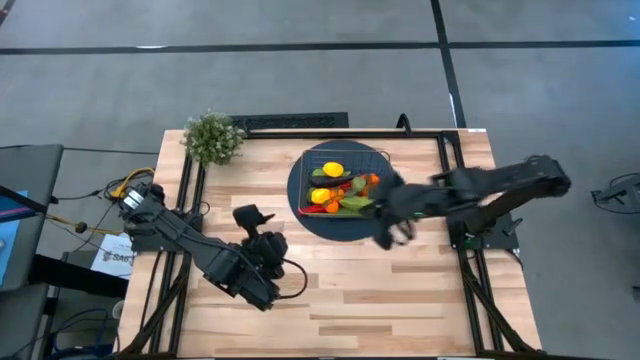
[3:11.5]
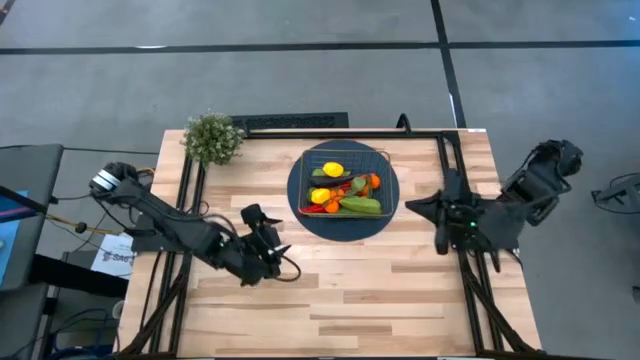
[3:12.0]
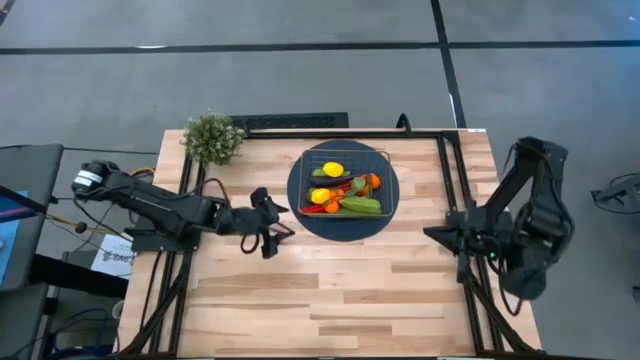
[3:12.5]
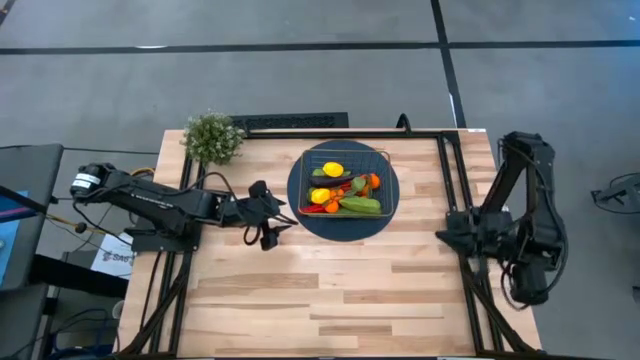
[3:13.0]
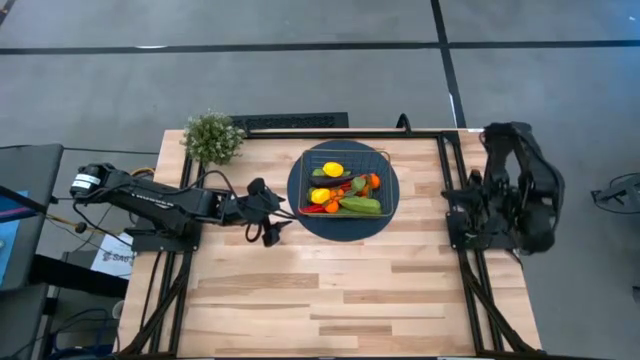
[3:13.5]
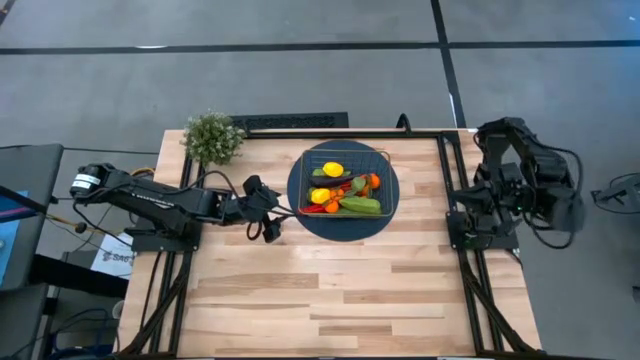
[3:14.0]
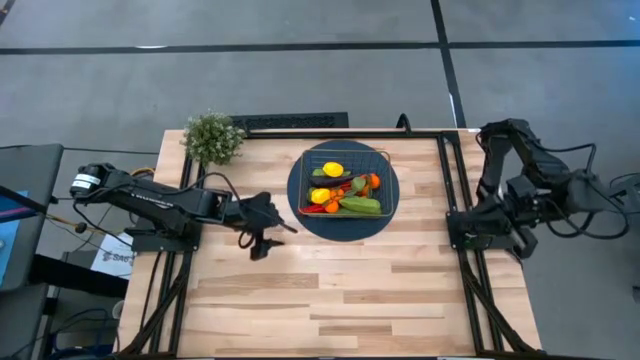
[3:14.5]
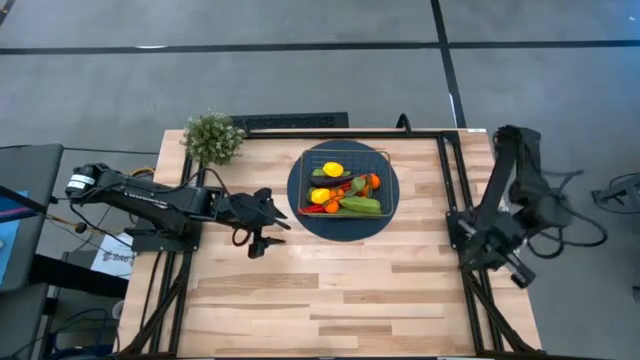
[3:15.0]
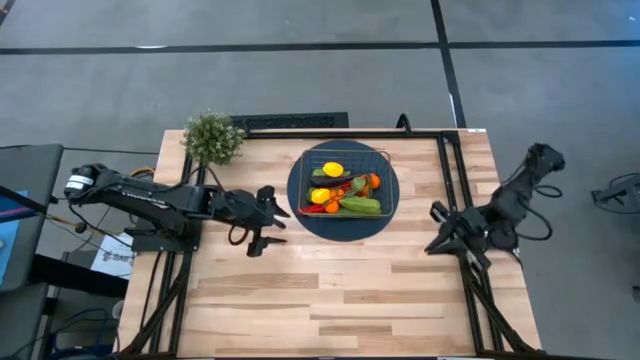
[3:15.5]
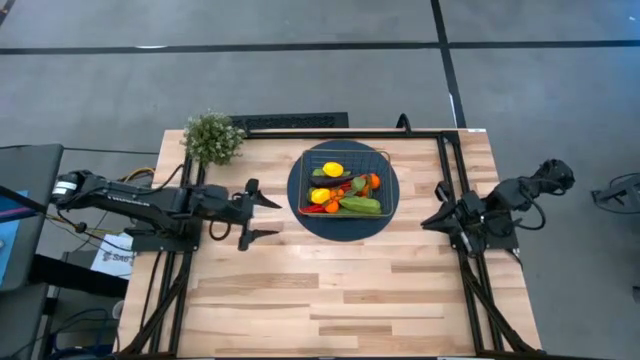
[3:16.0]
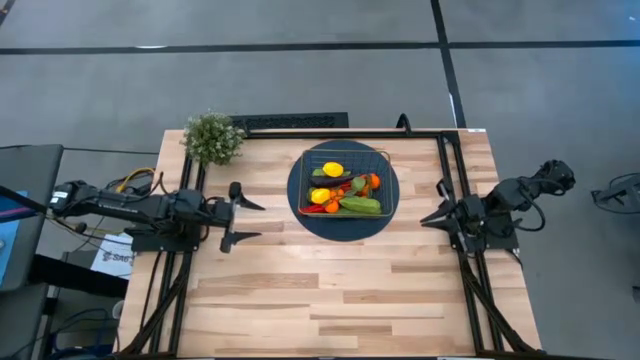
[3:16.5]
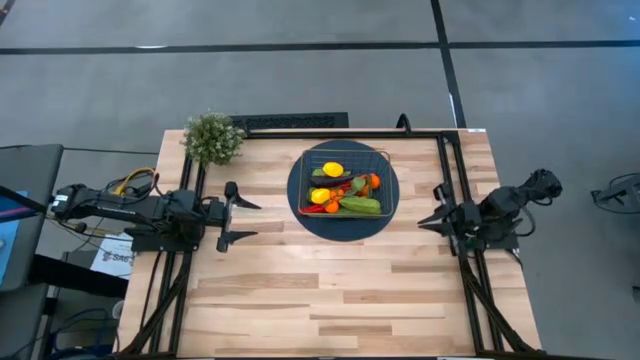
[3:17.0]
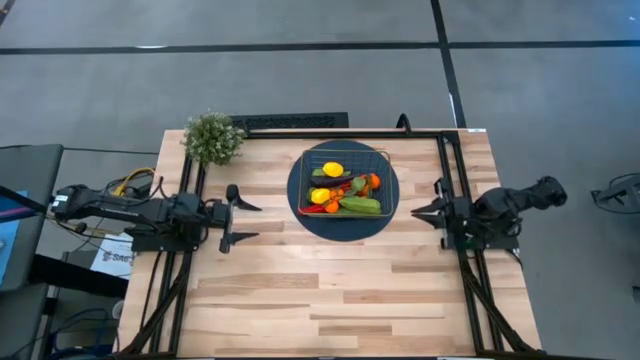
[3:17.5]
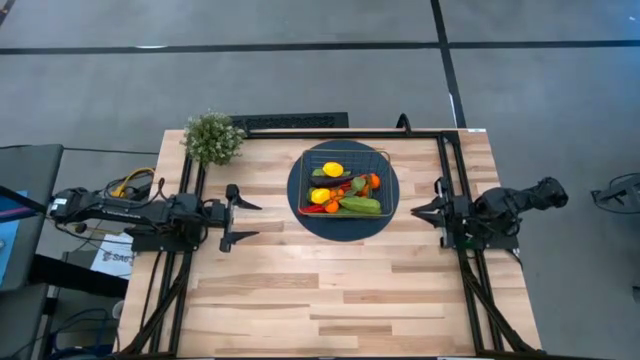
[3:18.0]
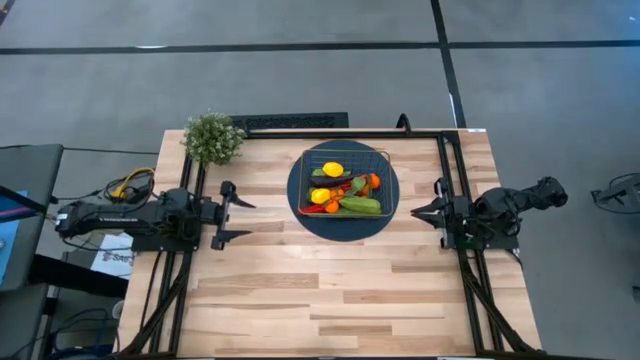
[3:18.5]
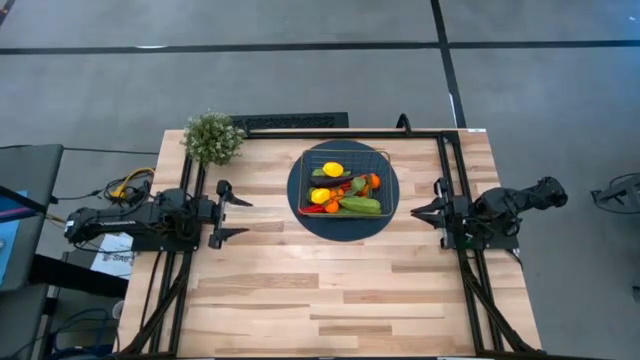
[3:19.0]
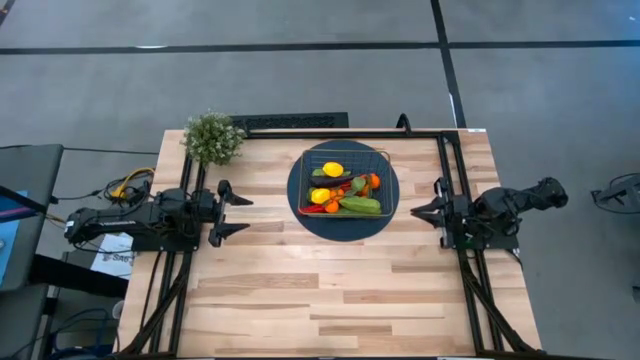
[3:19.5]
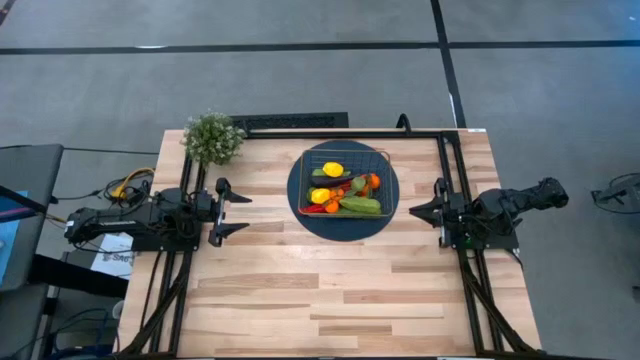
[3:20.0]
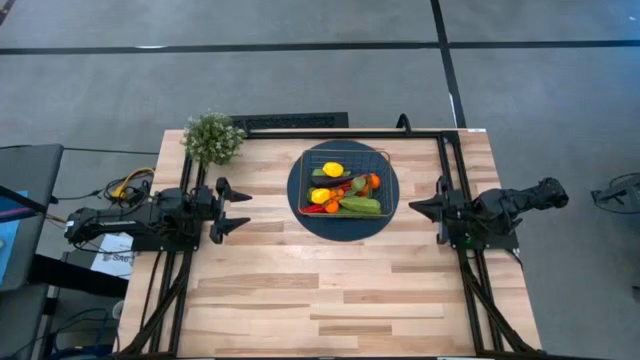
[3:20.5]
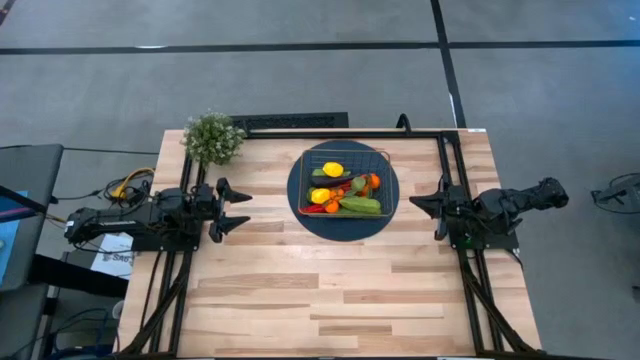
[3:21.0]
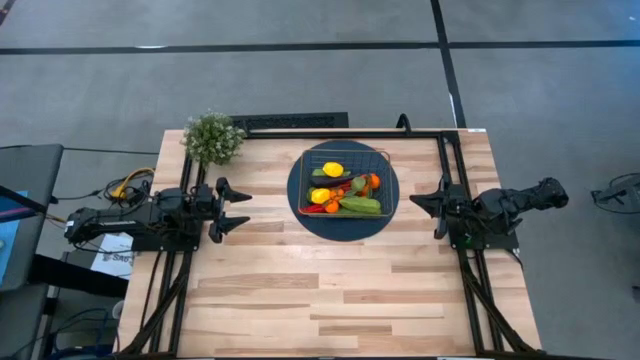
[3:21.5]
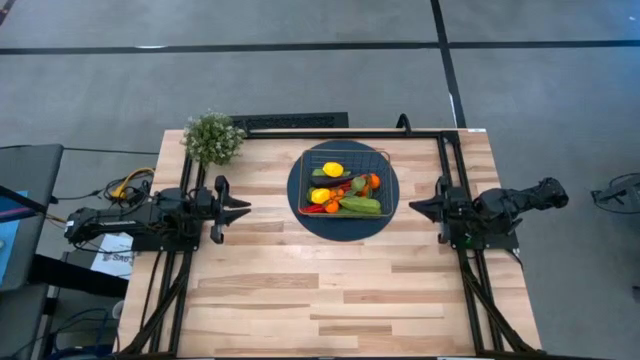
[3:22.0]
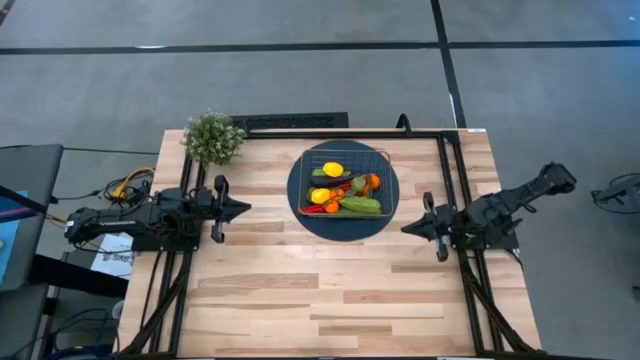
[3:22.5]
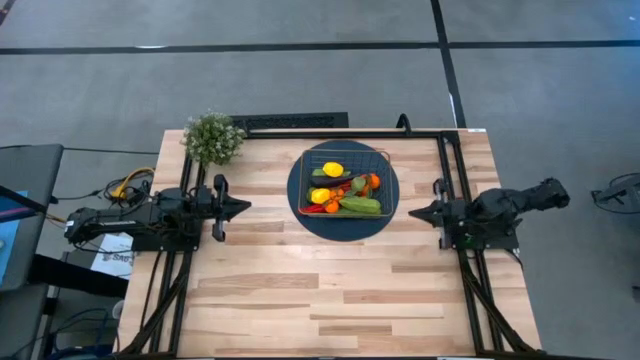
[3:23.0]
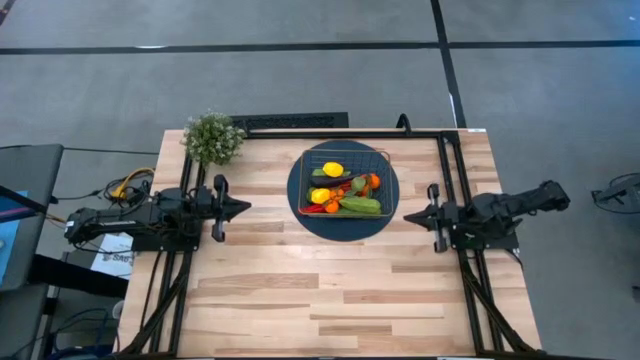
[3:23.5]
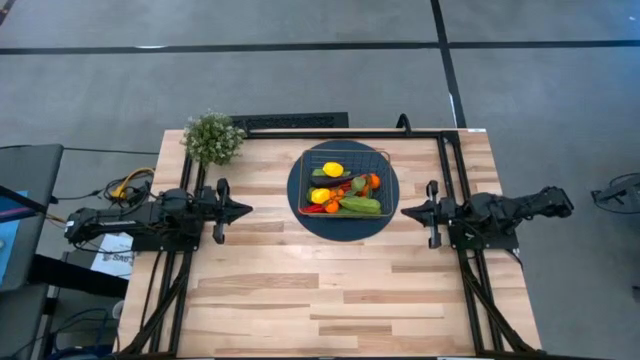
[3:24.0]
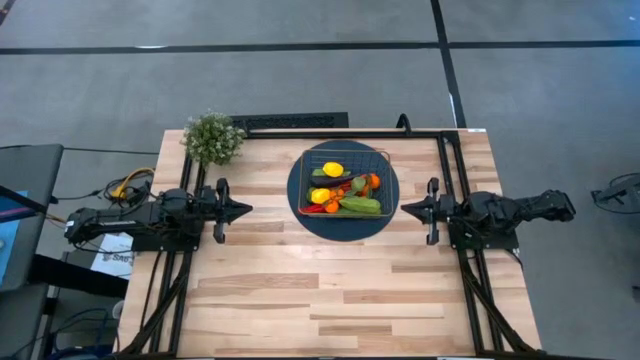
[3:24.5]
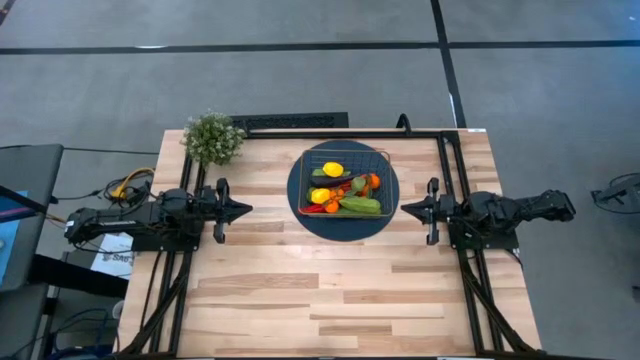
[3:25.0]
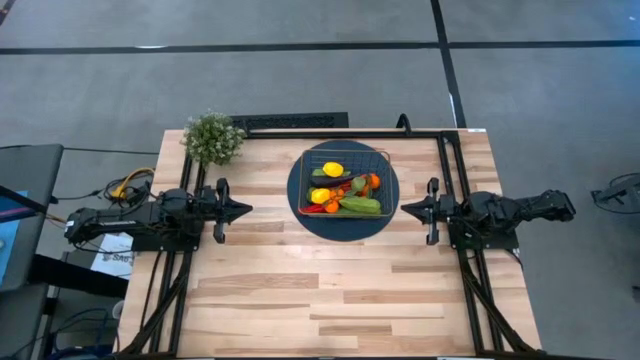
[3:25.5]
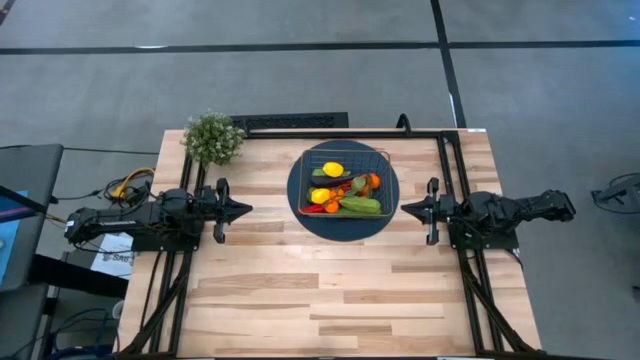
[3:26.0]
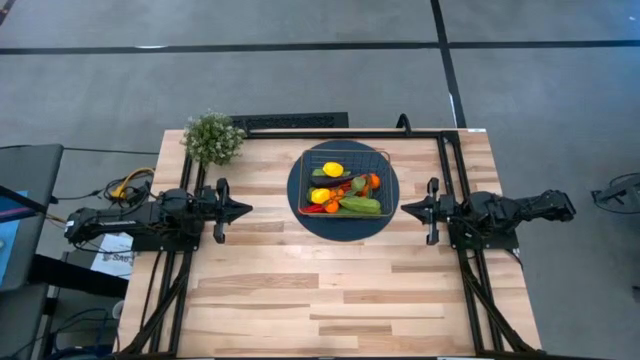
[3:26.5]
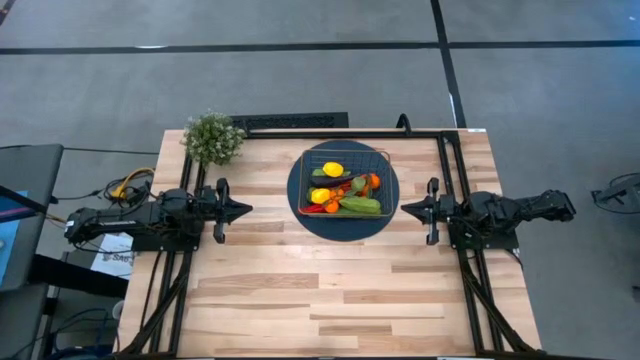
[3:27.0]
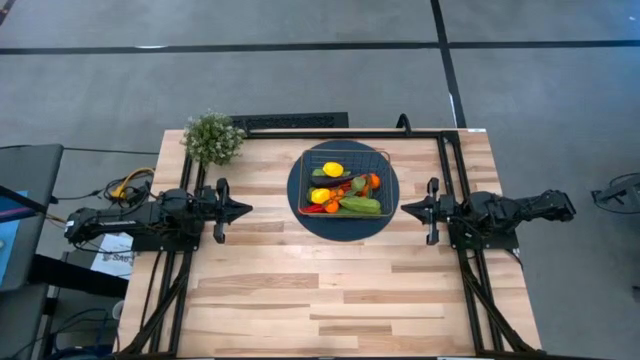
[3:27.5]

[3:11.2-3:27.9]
Task: Build produce basket
Return to Home Position

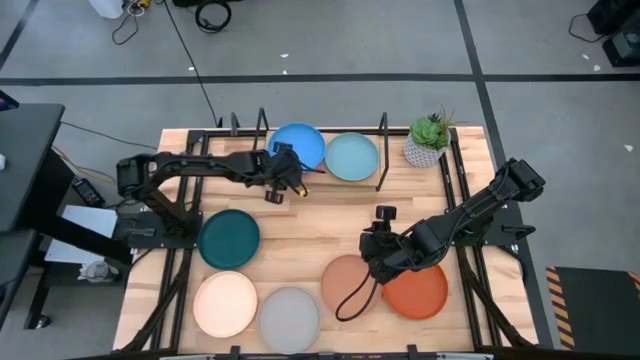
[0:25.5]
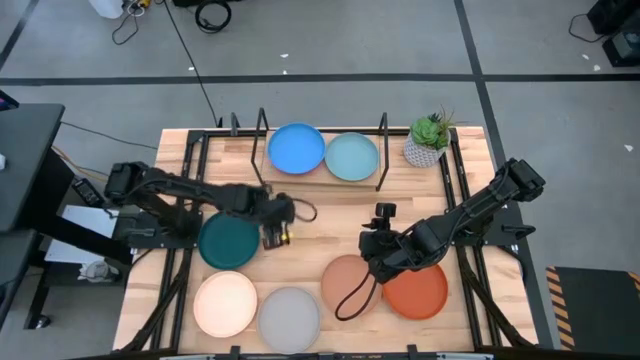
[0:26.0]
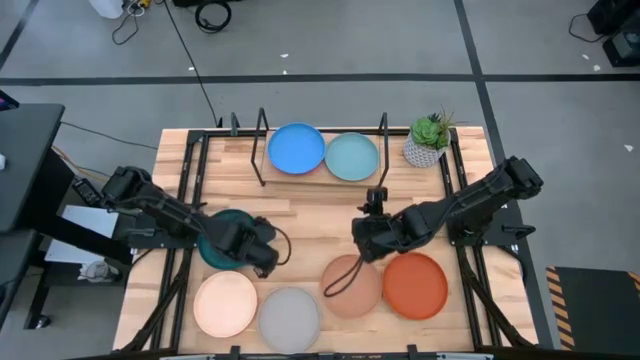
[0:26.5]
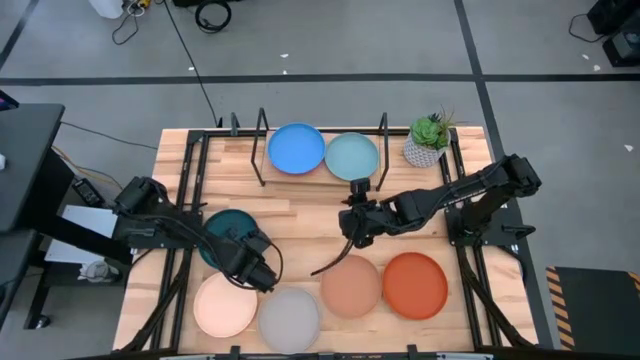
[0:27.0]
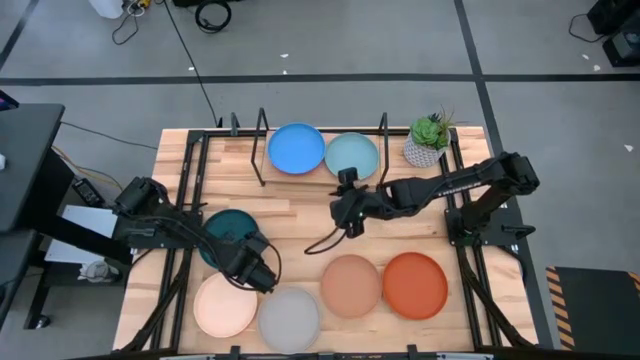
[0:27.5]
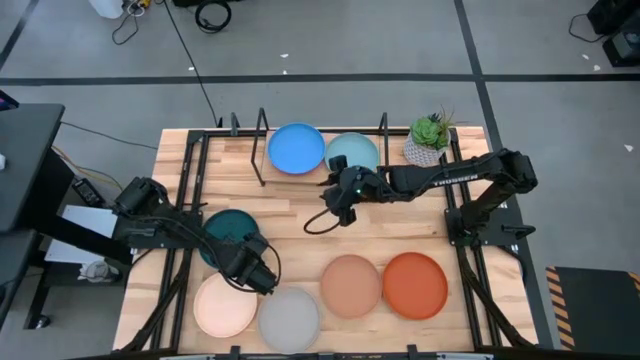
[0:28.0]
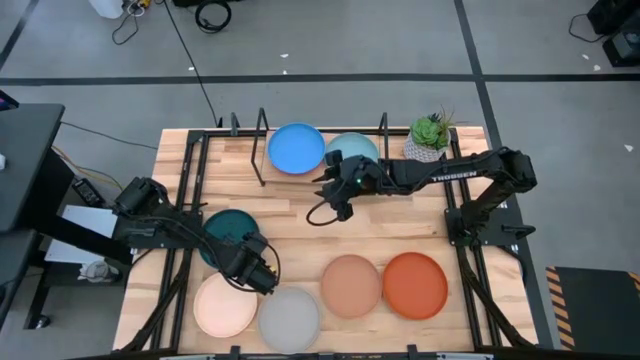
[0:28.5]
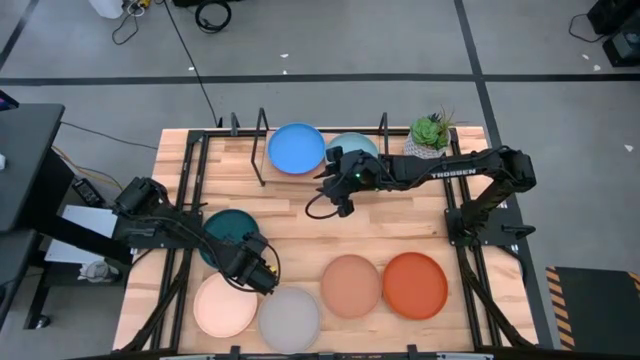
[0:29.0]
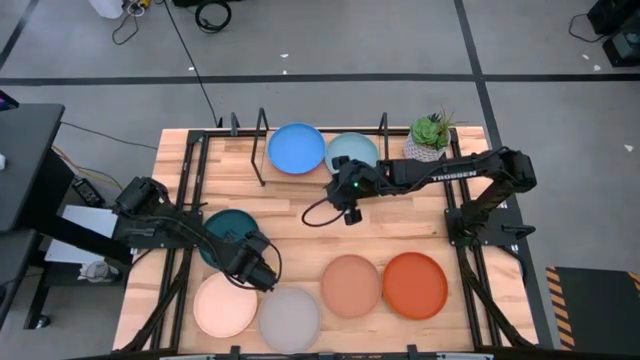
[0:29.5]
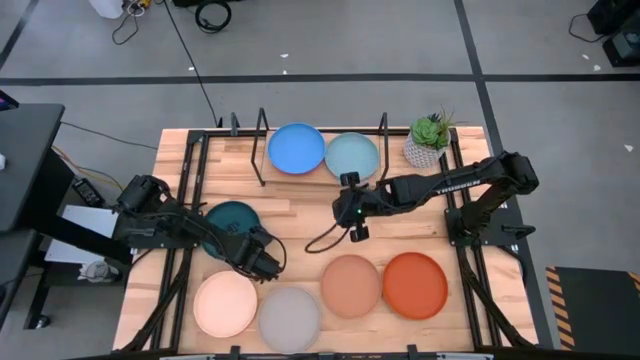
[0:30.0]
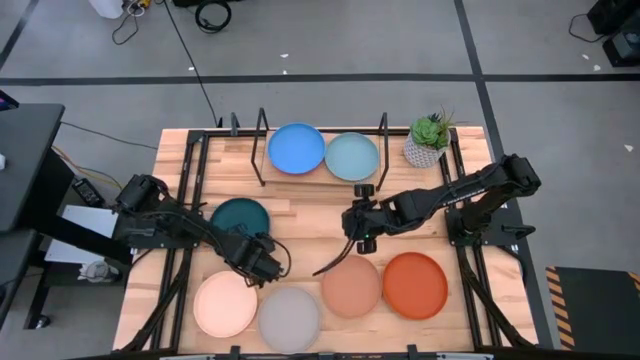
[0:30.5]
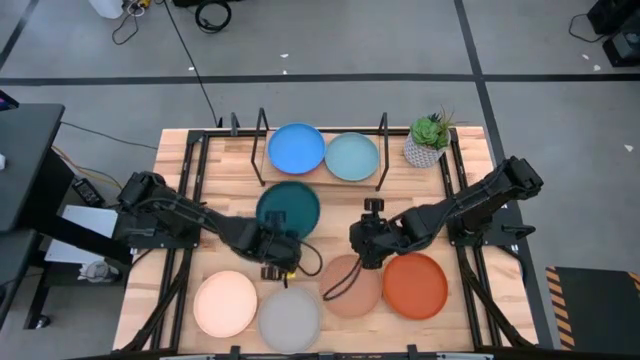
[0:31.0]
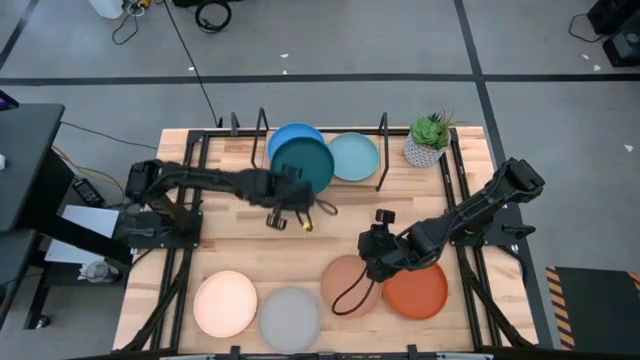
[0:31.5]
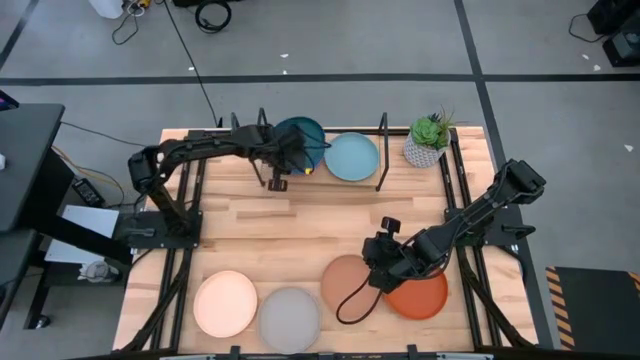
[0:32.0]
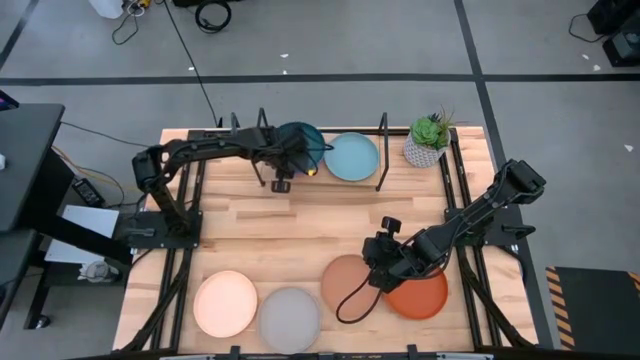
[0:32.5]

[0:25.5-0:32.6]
Task: Place and stack plates onto a shelf
Stack the dark green plate on top of the blue plate on the shelf
